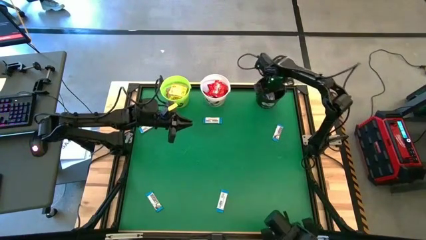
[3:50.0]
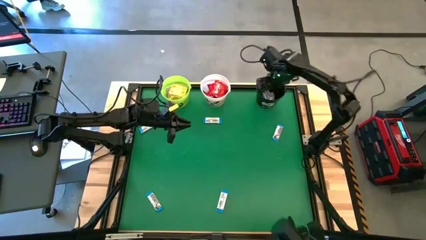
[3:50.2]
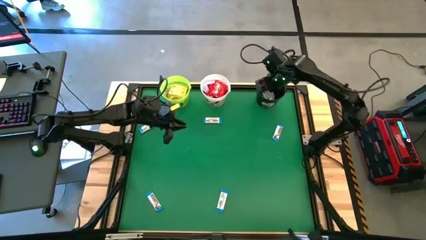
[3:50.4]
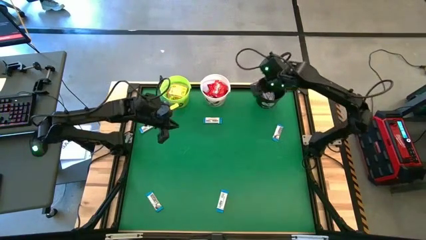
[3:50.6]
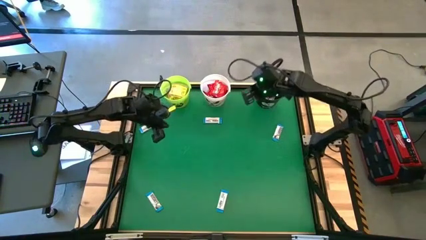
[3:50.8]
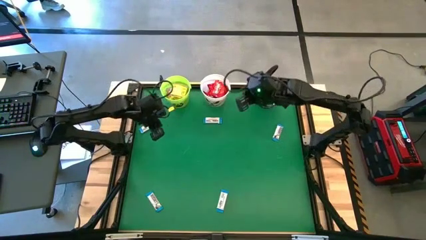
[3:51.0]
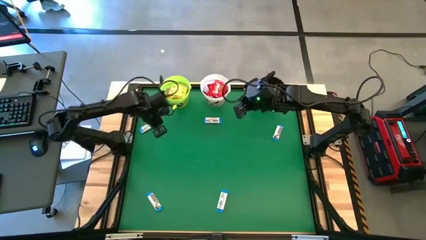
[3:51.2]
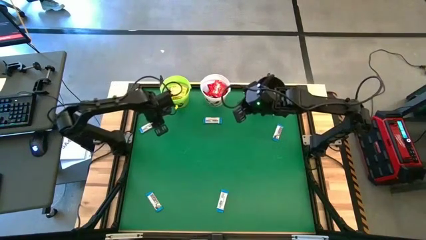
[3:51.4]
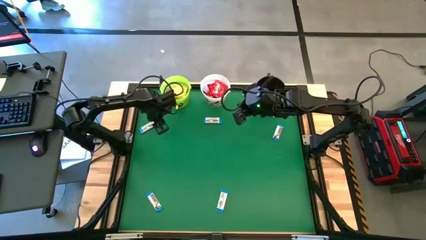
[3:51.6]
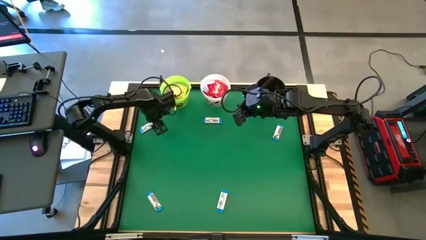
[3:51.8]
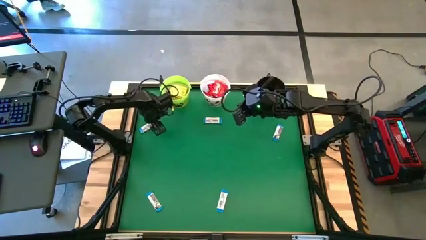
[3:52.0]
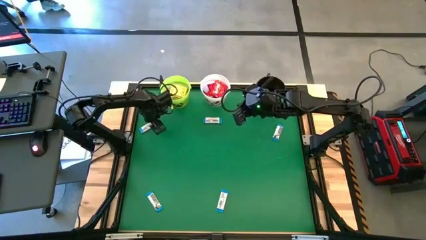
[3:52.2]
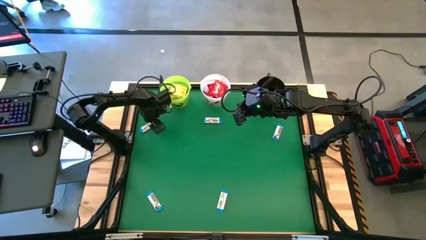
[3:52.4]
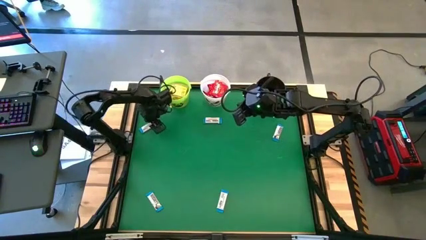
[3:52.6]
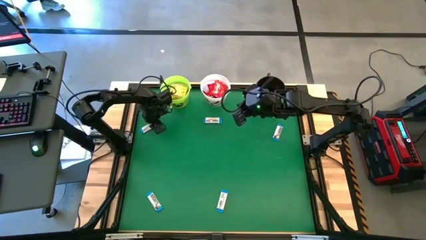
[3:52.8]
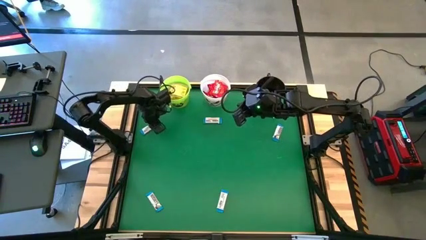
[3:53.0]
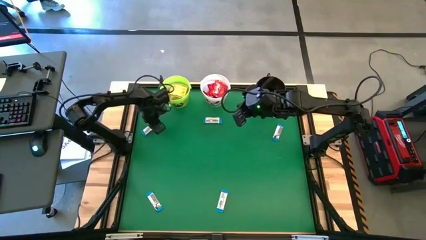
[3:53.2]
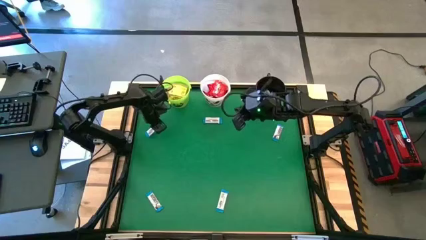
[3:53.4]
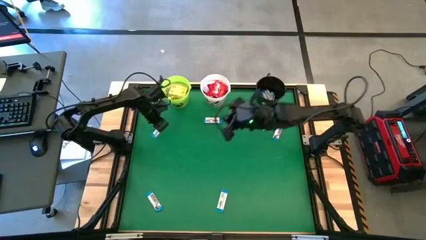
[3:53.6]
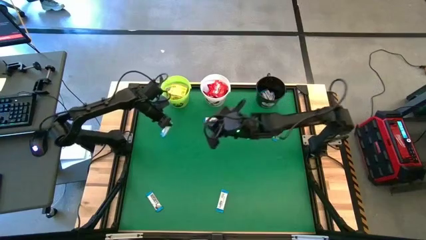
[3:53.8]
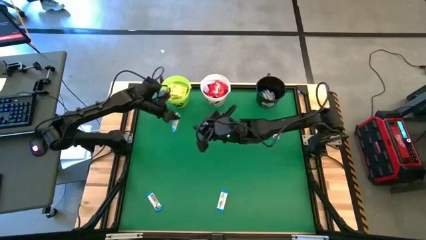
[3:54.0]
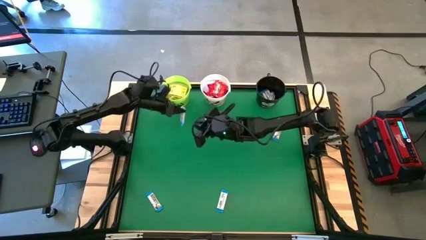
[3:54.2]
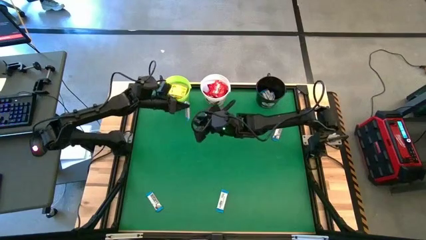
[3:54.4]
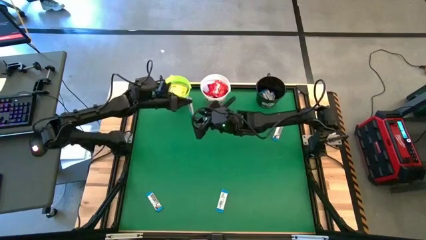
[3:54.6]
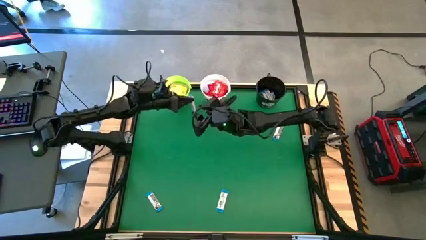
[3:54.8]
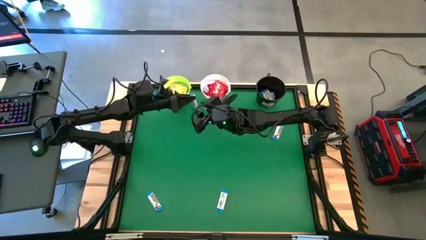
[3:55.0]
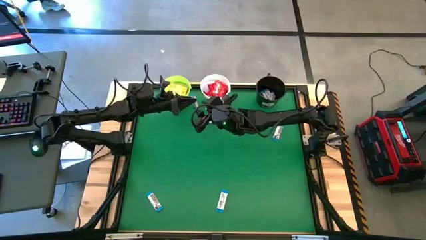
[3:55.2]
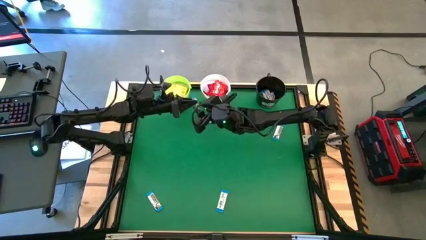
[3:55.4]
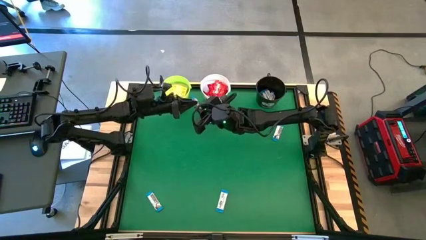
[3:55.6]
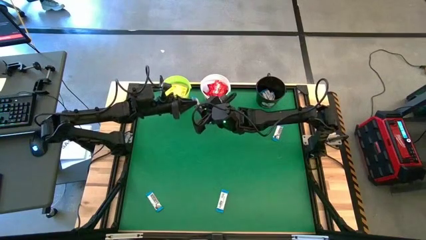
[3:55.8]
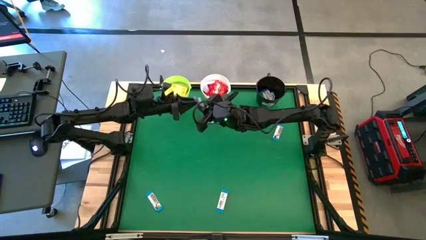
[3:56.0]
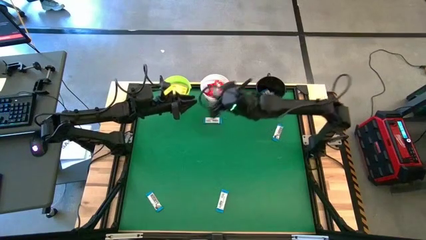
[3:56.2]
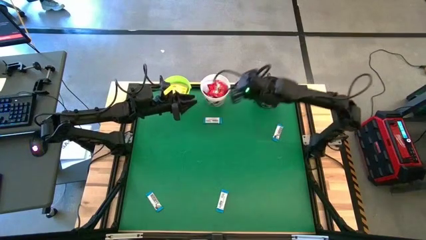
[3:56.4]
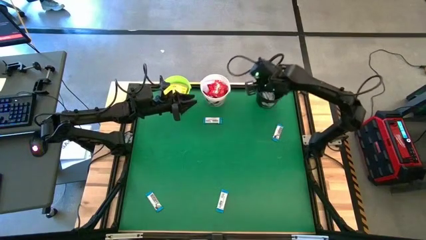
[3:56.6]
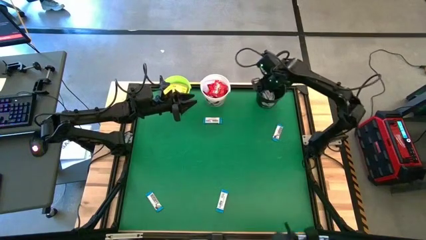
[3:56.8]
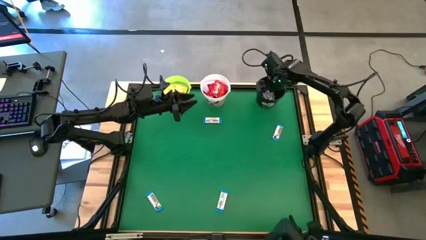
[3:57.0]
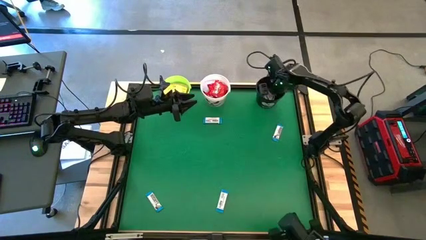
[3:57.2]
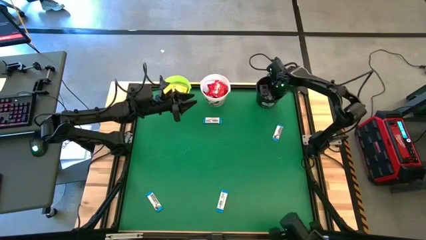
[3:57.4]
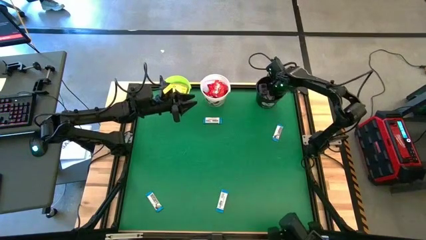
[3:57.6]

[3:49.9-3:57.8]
Task: Sort candy by brand, put in halloween buckets
Put the white chocolate bar into the black bucket

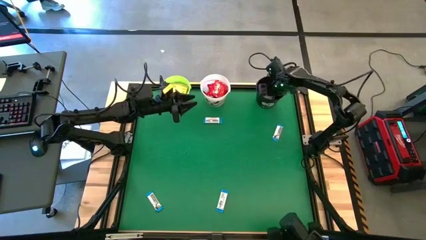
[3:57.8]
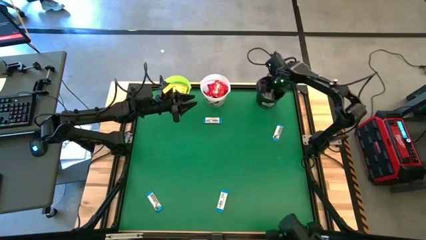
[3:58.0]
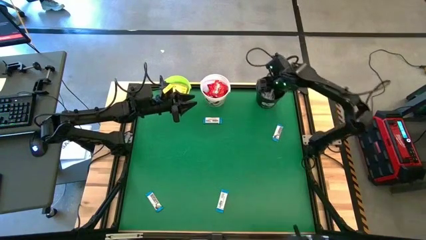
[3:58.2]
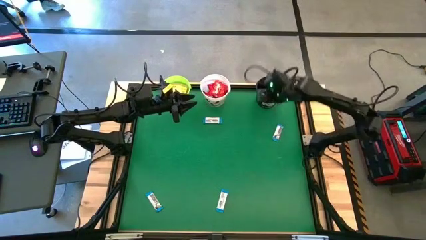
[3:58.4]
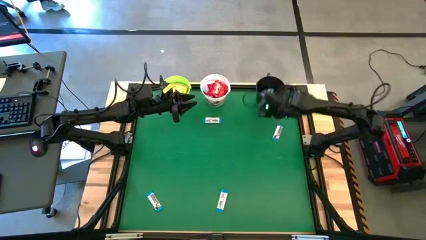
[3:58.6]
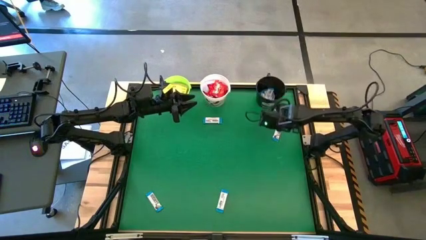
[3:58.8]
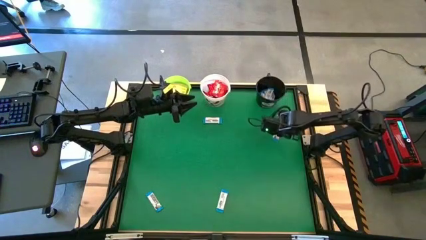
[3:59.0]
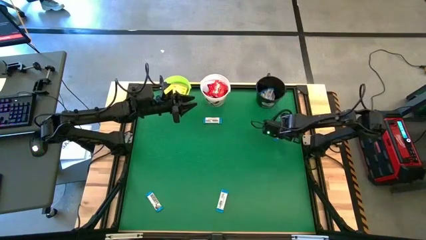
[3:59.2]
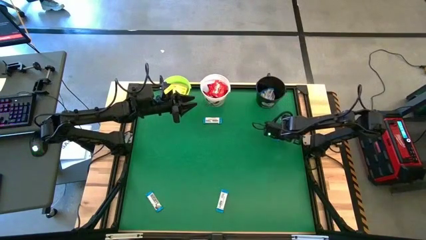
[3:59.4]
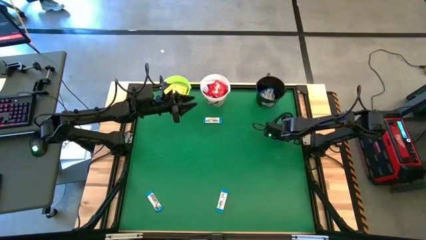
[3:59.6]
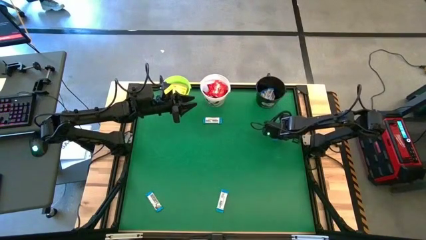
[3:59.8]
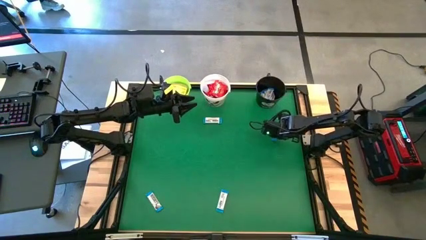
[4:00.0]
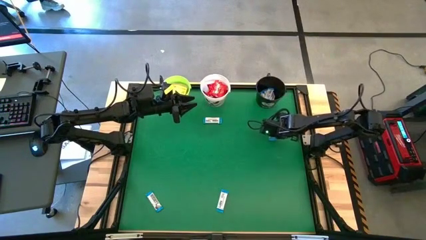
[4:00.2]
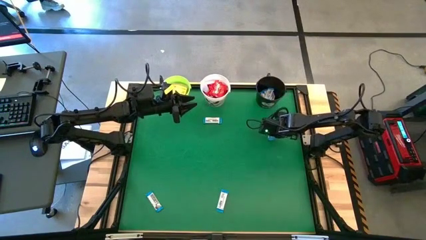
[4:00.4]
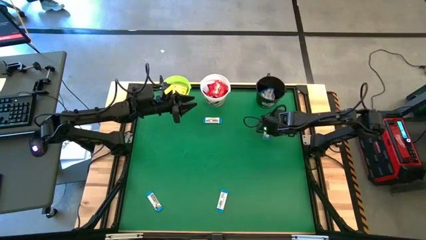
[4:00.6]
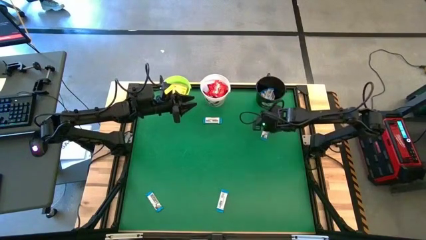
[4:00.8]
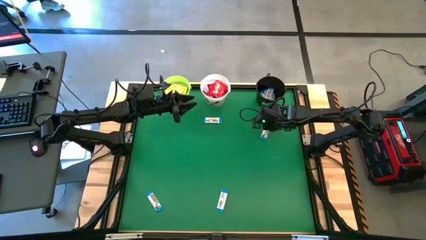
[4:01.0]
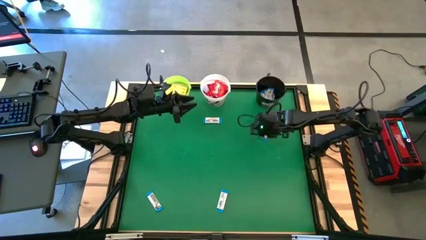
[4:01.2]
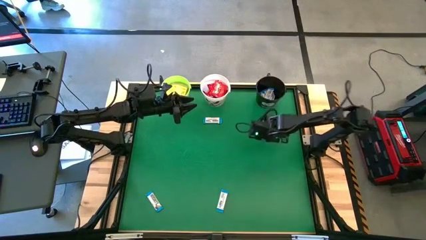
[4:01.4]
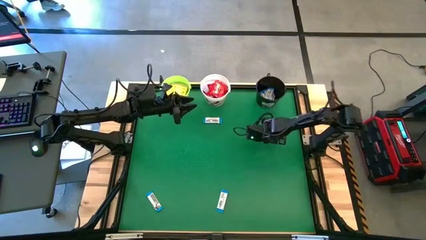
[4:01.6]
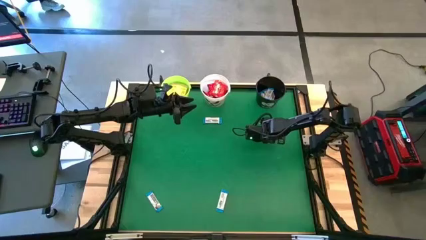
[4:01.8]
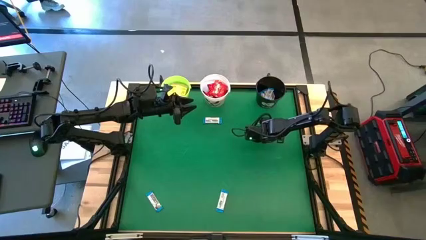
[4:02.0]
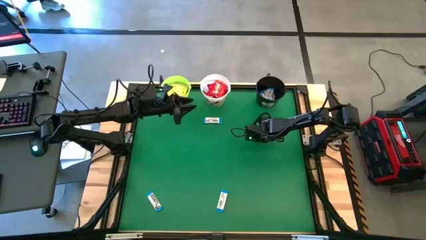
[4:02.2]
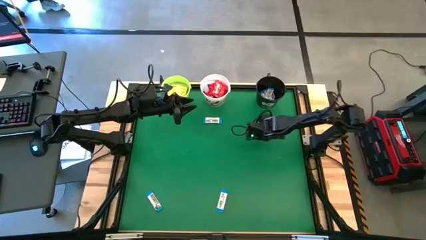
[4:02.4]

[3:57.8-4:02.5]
Put the white chocolate bar into the black bucket

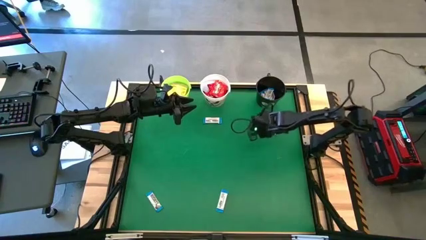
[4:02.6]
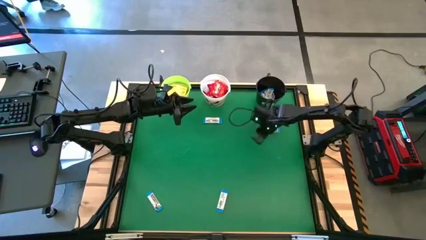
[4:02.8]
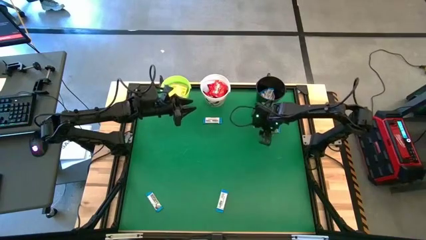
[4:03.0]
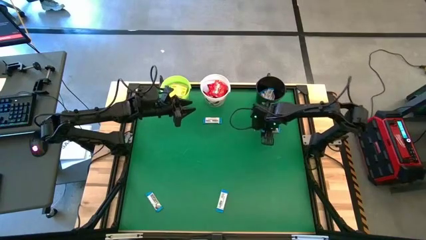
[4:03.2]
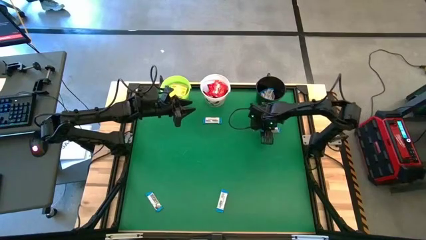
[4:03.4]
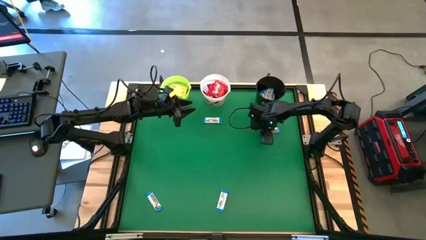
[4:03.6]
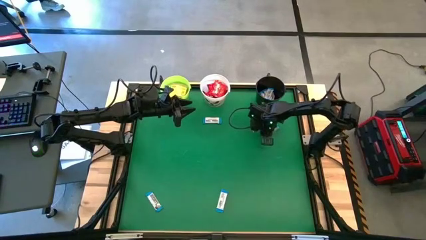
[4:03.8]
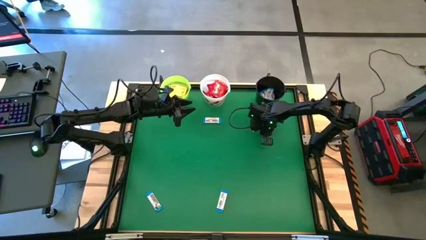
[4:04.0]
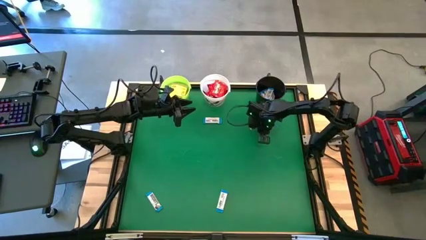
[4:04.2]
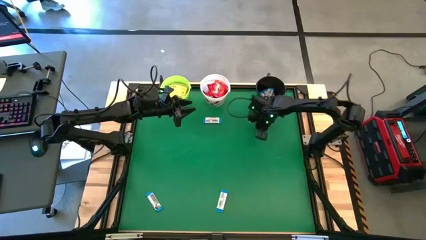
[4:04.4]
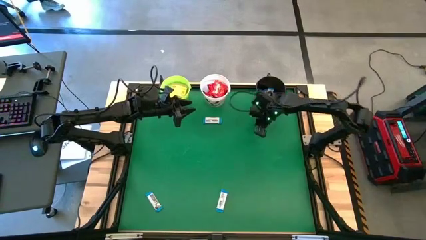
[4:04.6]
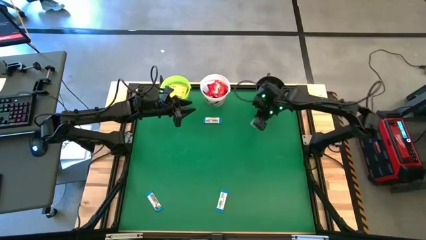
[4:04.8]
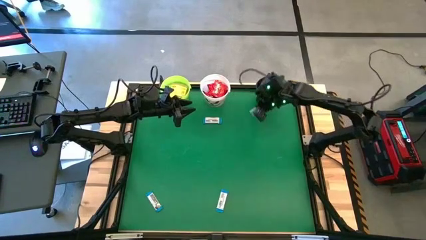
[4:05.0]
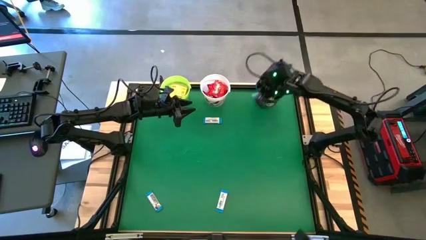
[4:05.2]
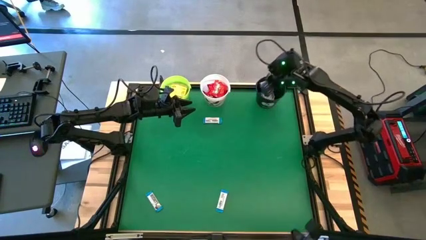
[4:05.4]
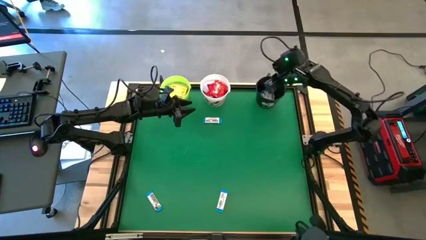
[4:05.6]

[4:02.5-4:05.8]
Put the white chocolate bar into the black bucket
